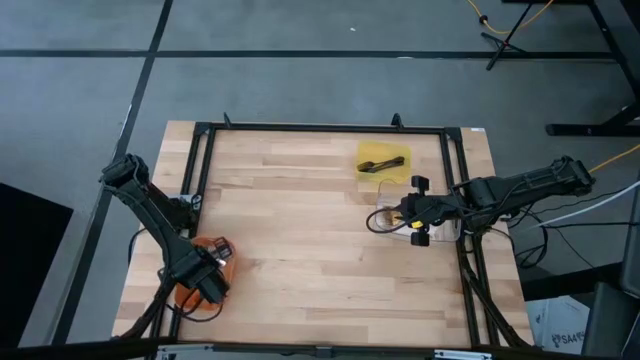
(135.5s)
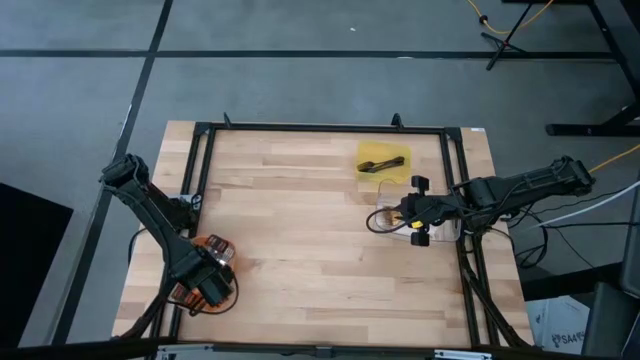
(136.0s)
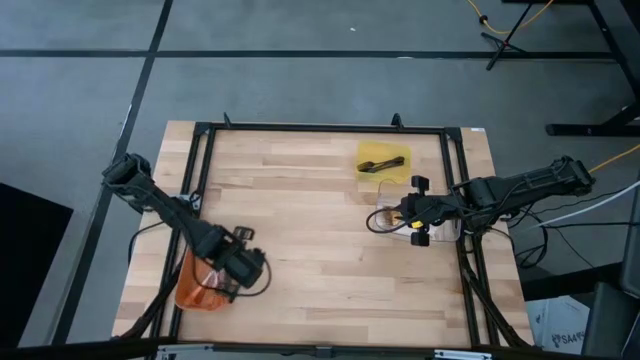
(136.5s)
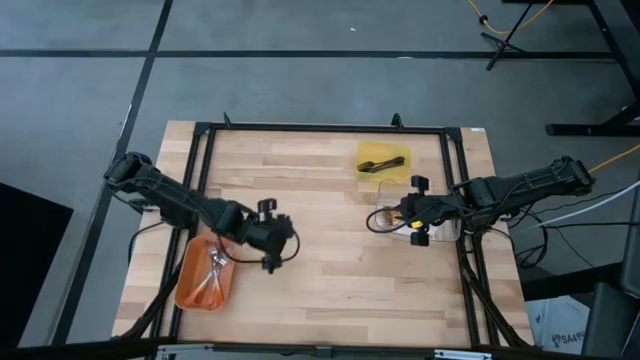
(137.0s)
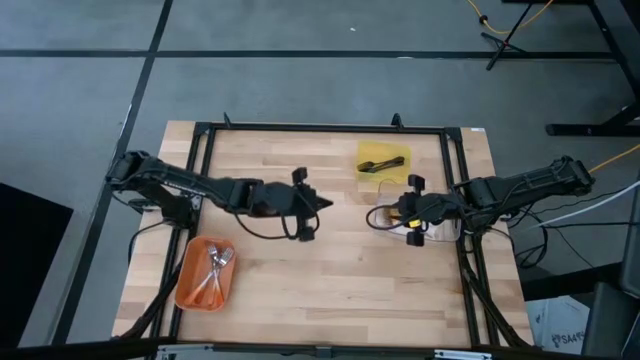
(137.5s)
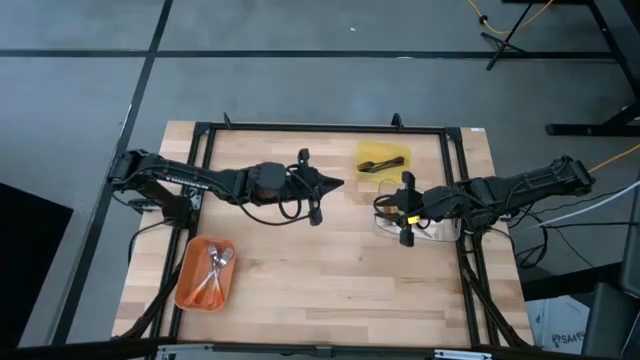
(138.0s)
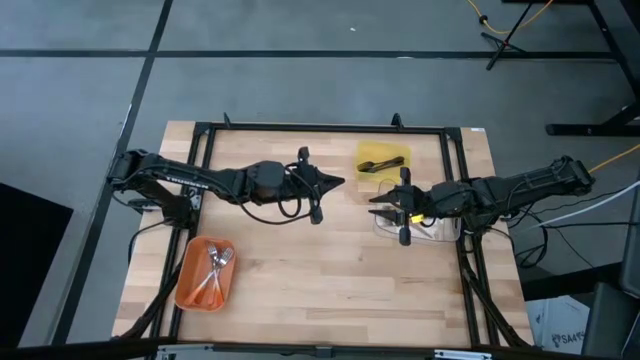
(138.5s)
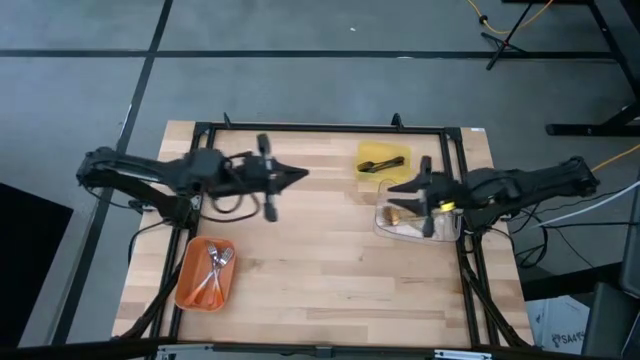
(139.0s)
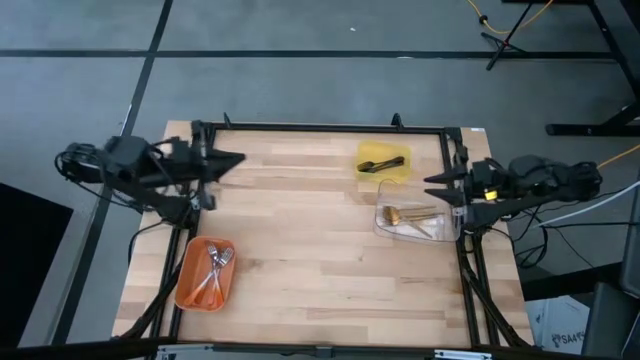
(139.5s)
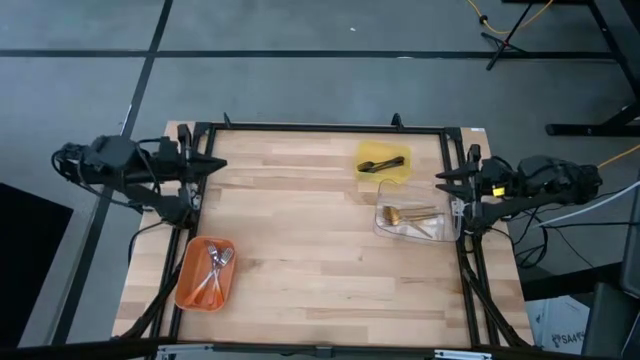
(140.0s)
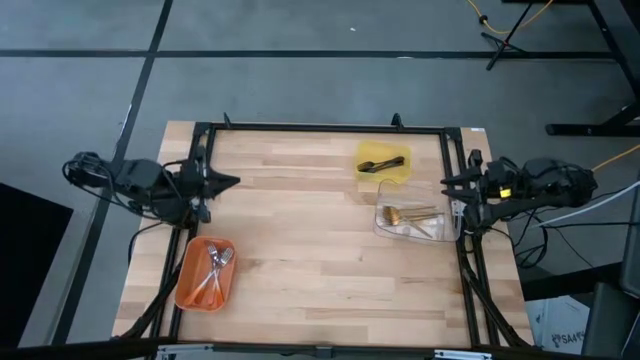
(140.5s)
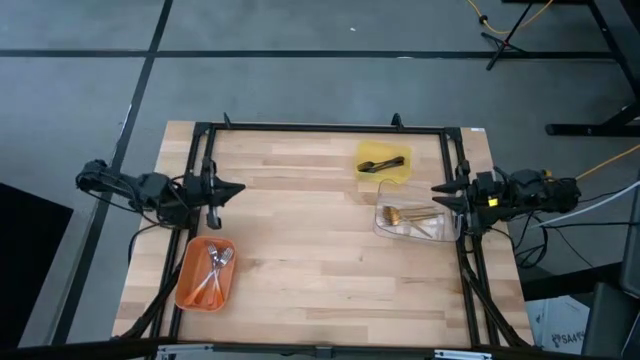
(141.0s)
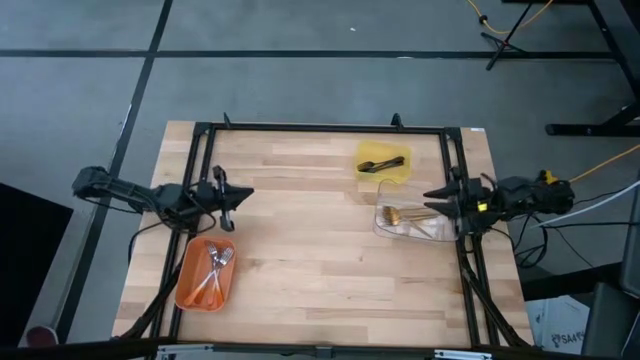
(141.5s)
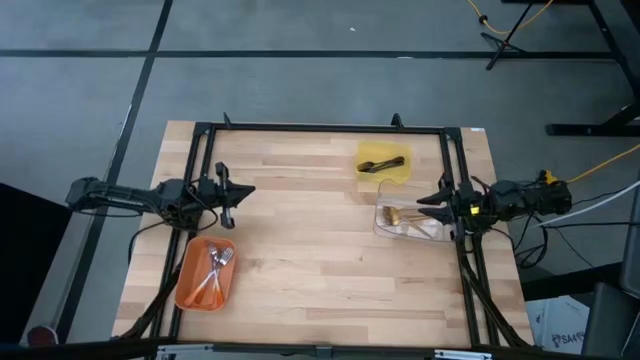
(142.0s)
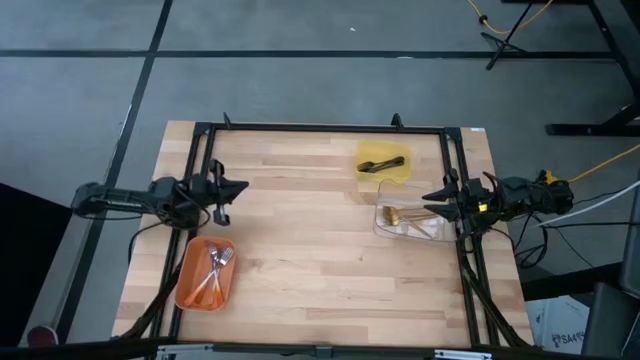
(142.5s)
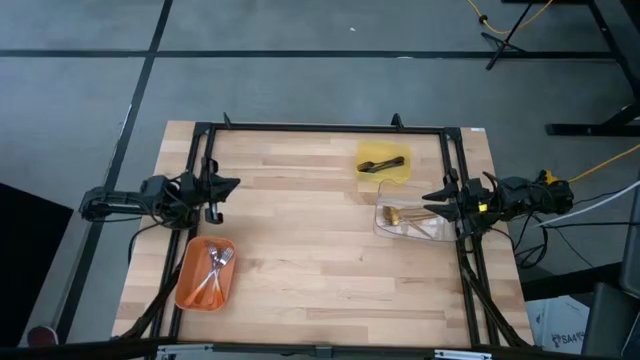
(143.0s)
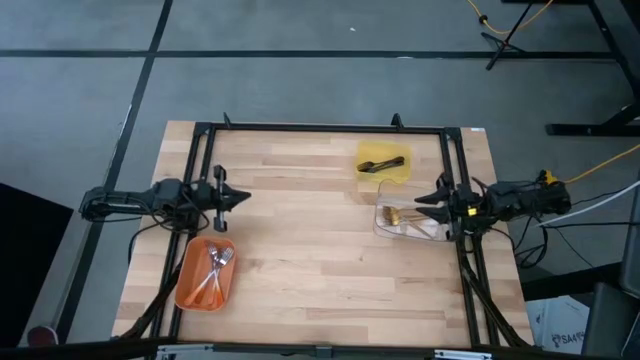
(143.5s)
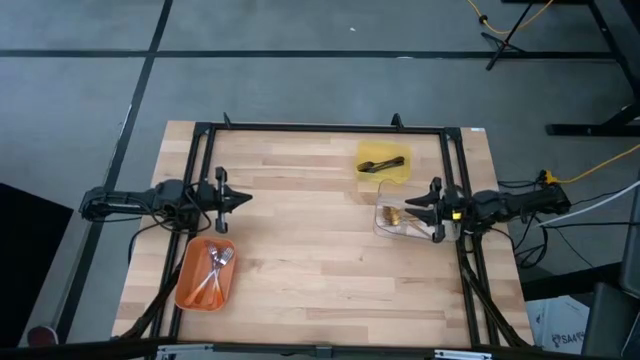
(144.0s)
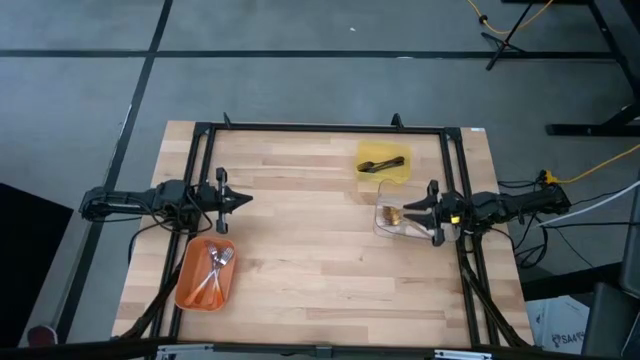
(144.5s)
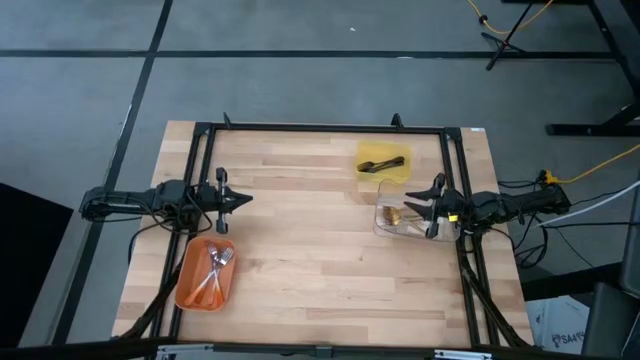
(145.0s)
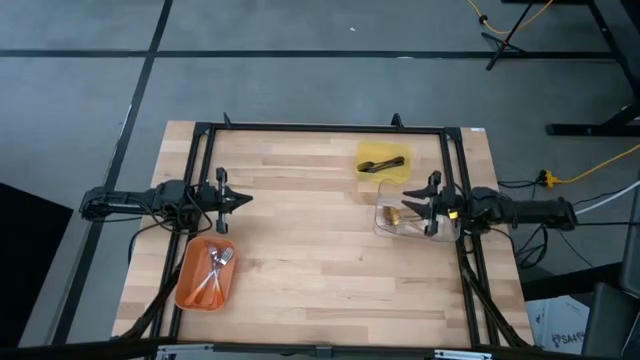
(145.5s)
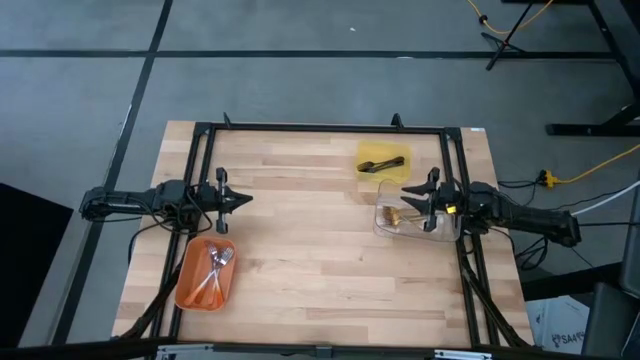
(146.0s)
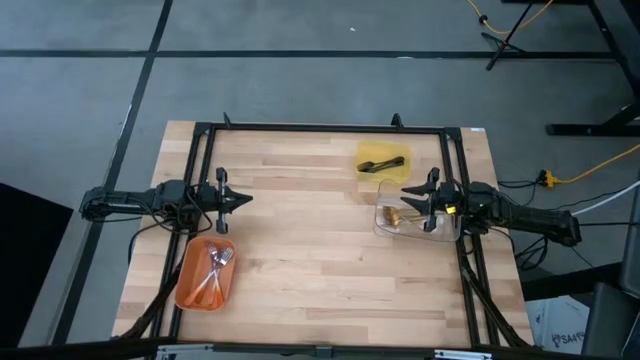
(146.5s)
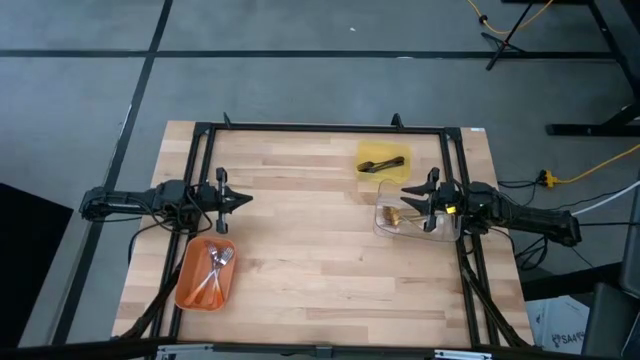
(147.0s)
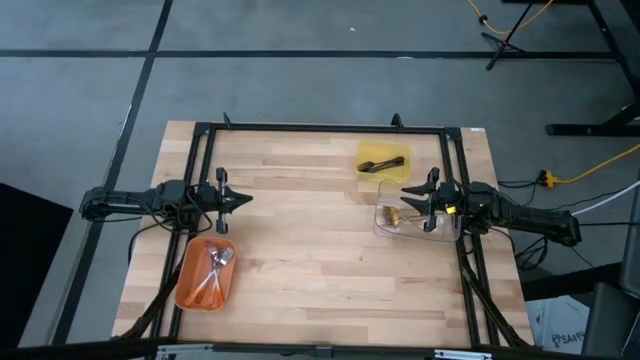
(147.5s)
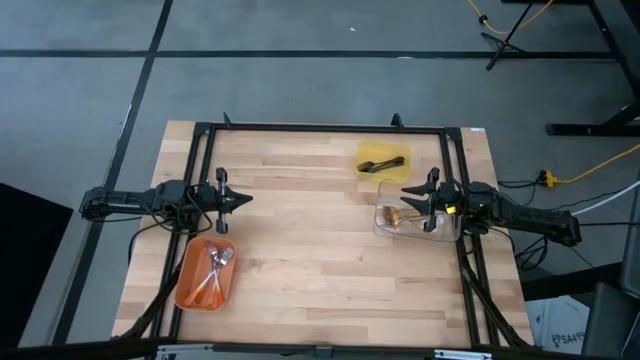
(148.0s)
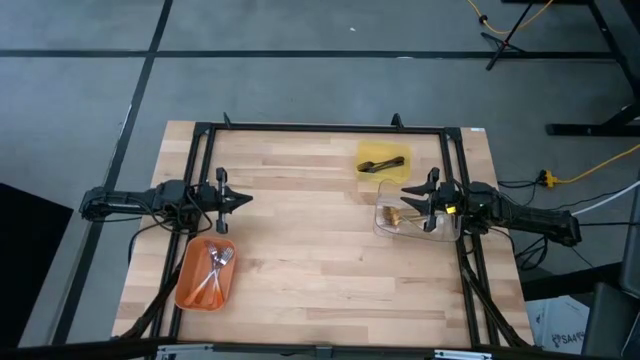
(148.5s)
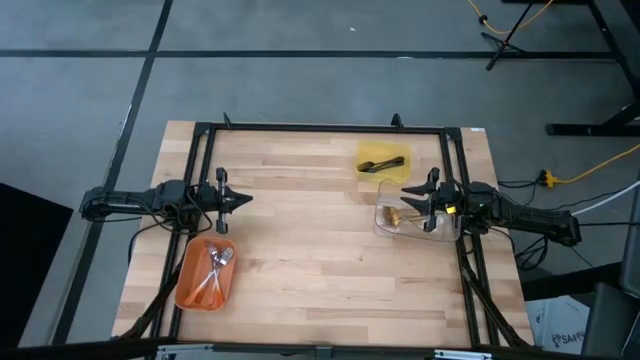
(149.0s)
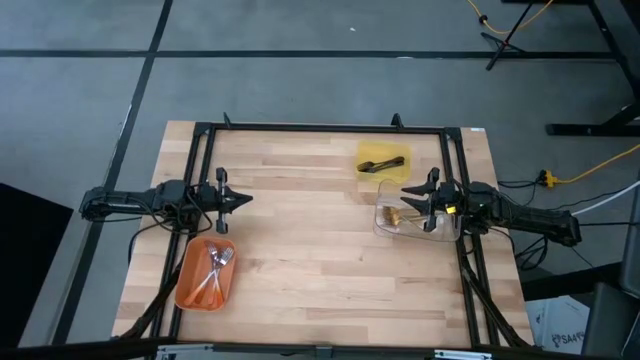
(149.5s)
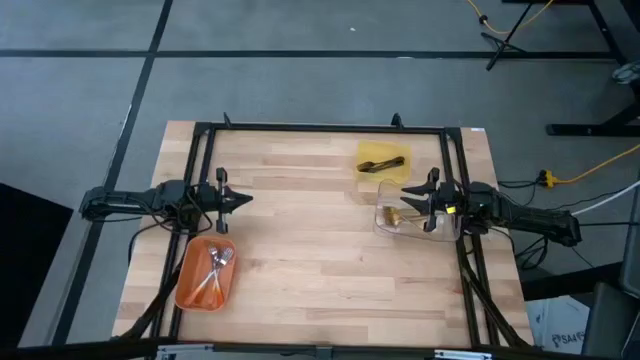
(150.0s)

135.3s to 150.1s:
Task: Sort silverware by color (type)
Return to Home Position

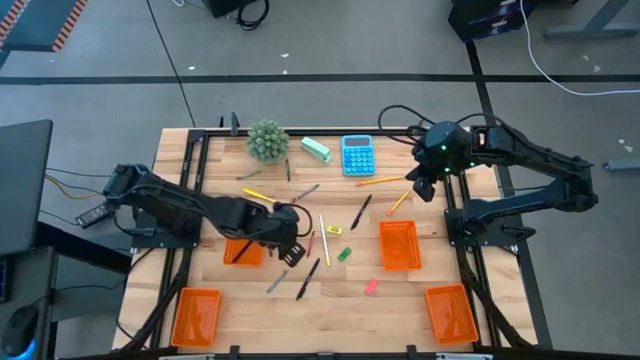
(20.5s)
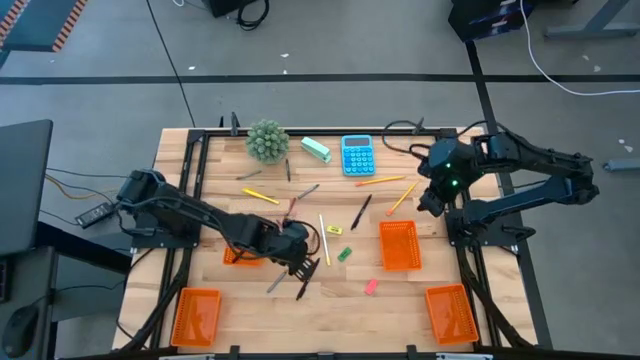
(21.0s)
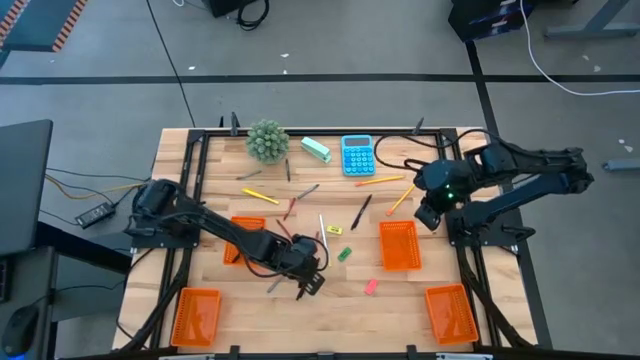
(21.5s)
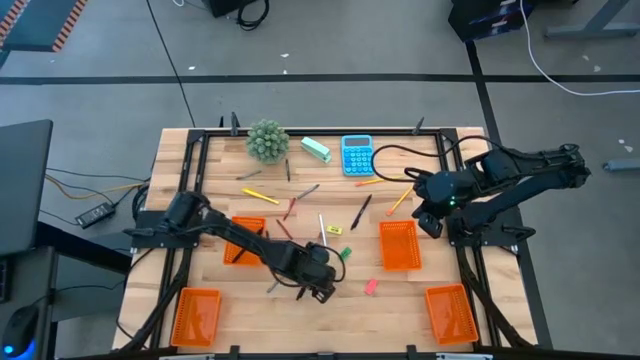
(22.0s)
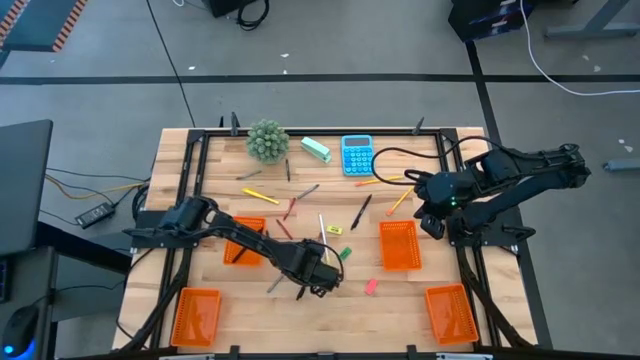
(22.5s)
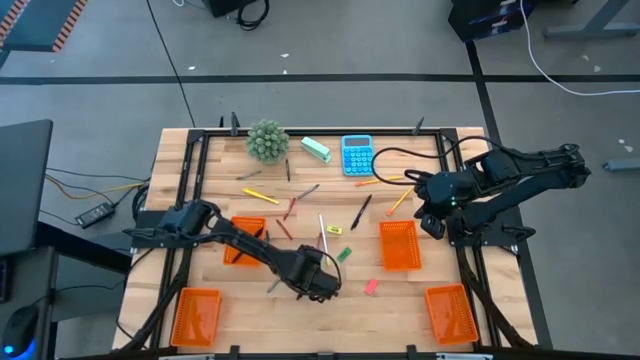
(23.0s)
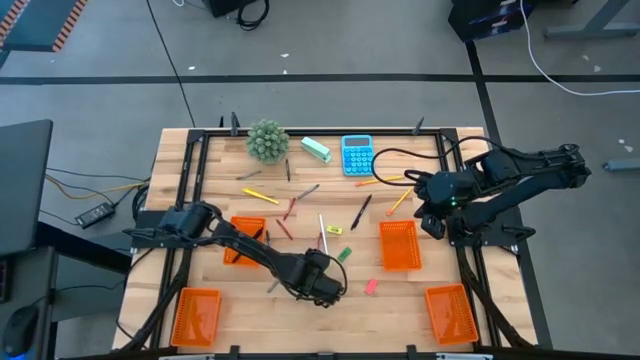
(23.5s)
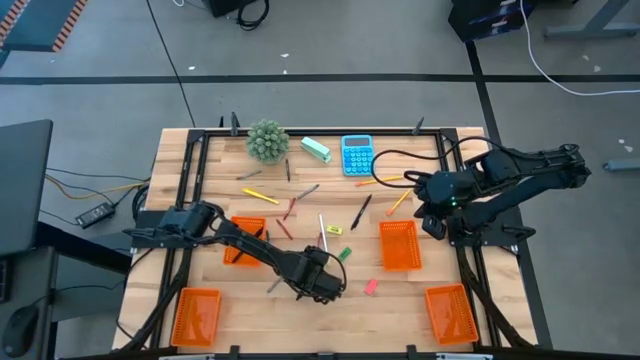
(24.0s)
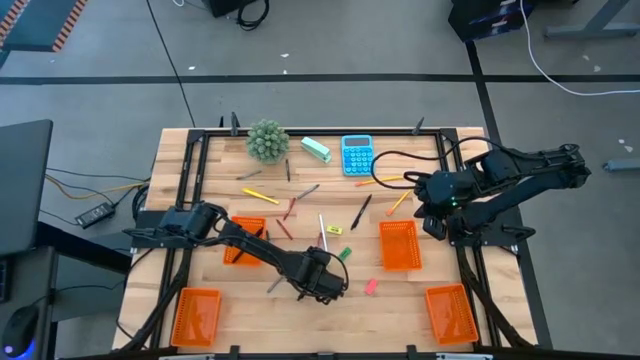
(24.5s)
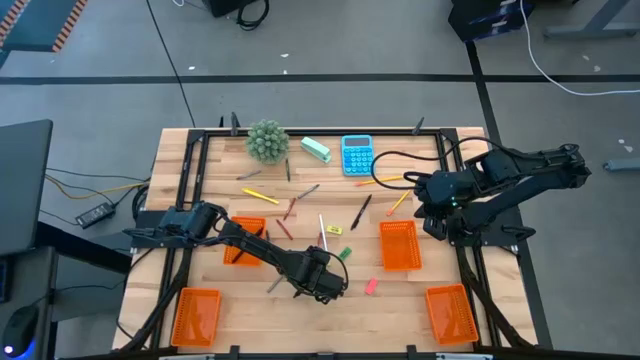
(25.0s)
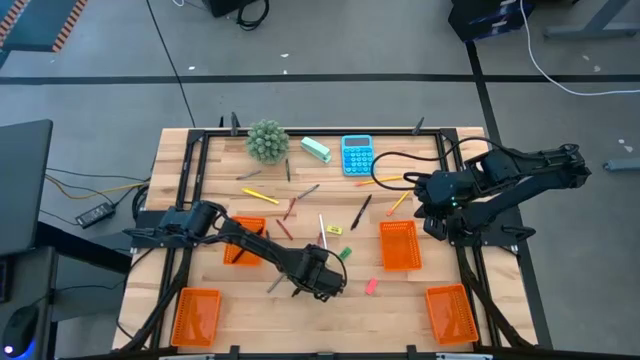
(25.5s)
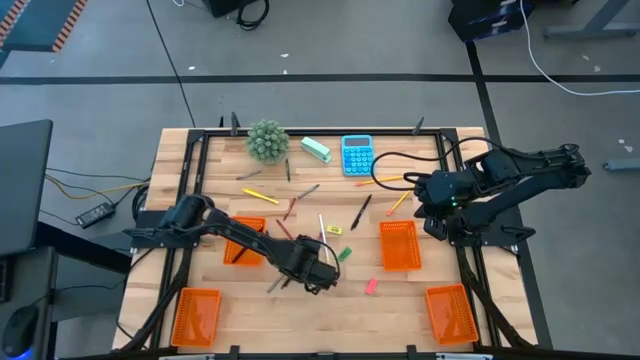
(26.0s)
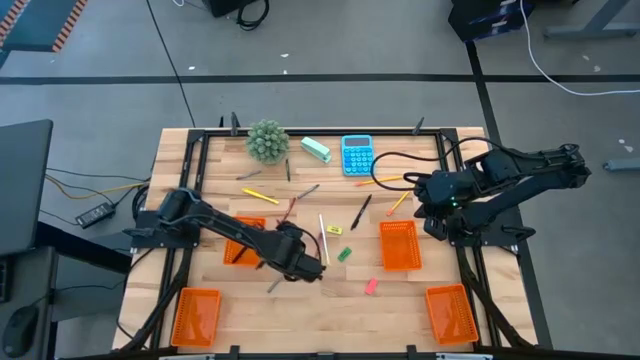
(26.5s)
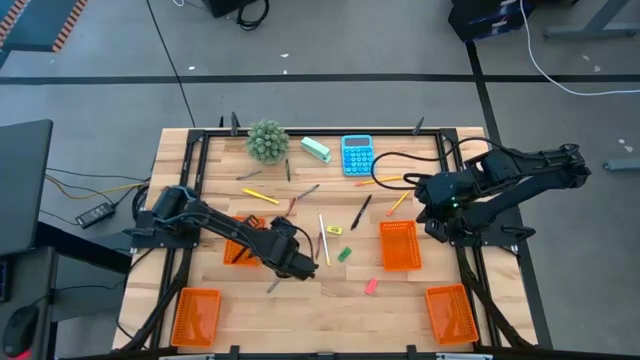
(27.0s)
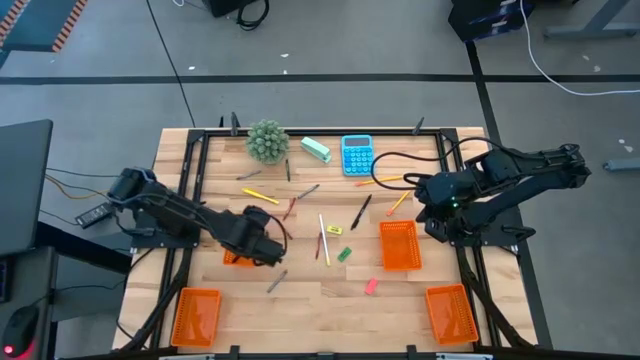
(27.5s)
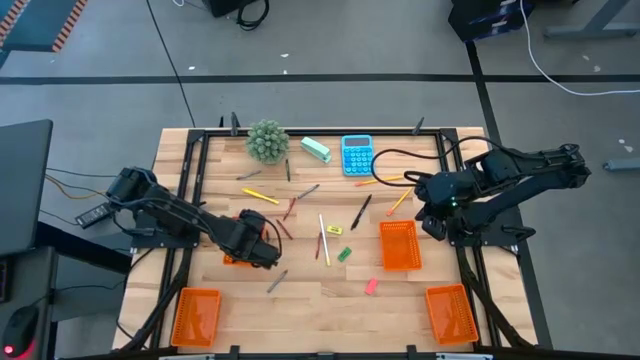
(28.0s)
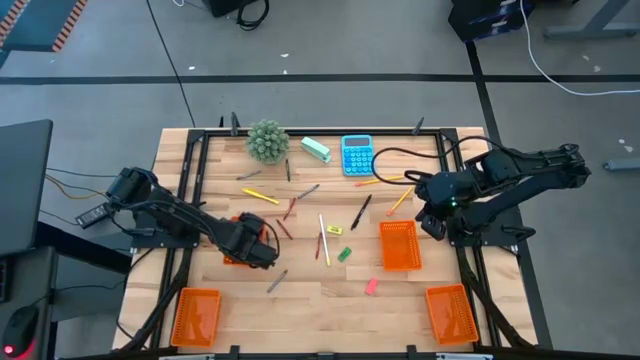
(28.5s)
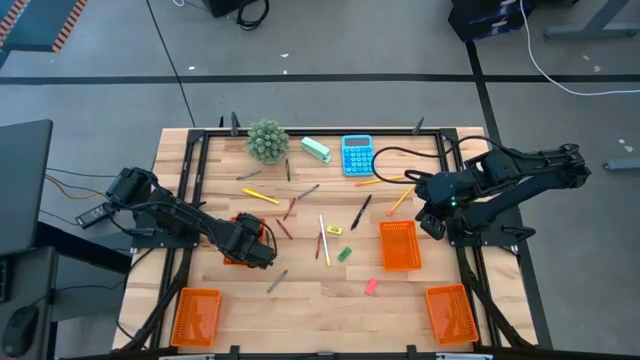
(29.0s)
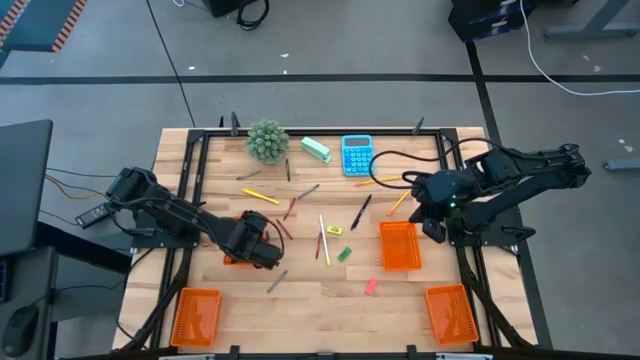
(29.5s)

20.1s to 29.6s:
Task: Sort crayons/erasers/pens/pencils in bins
Put the bottom black pen into the top left orange basket
